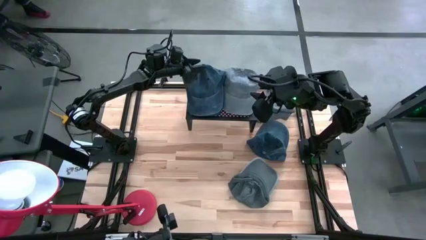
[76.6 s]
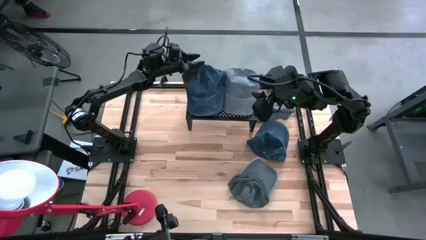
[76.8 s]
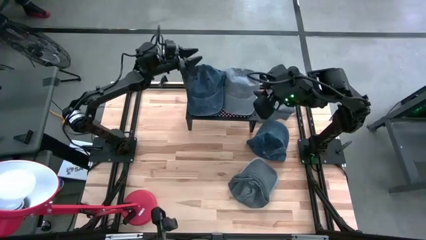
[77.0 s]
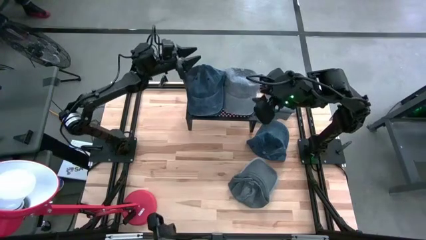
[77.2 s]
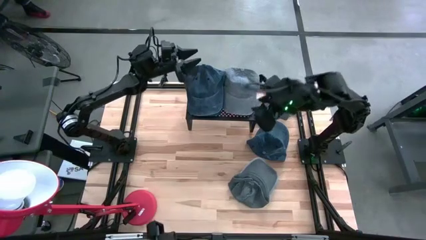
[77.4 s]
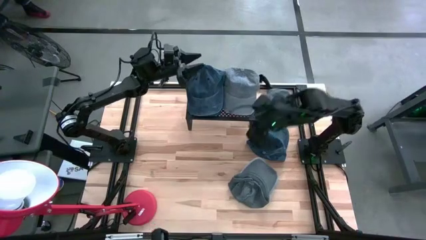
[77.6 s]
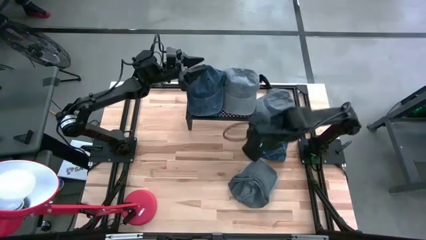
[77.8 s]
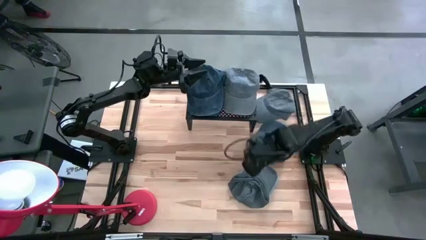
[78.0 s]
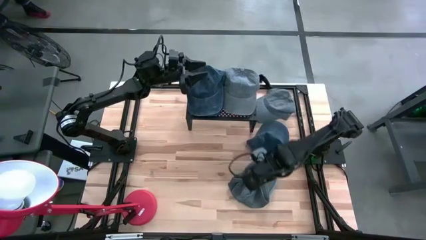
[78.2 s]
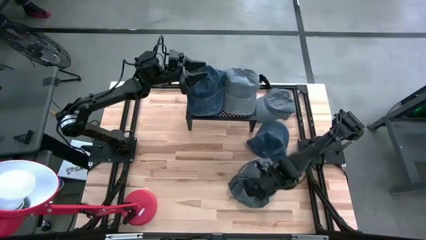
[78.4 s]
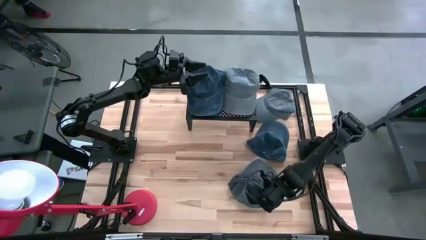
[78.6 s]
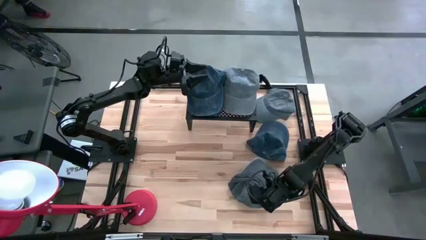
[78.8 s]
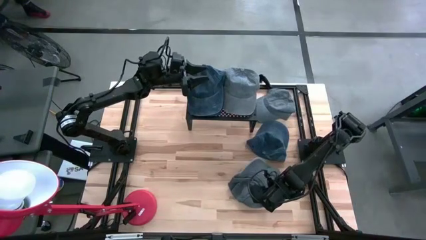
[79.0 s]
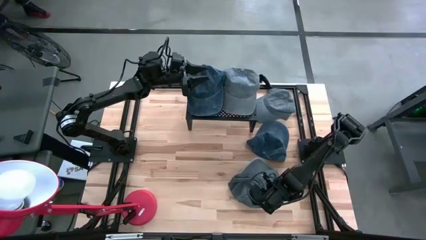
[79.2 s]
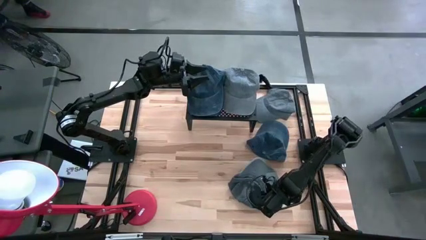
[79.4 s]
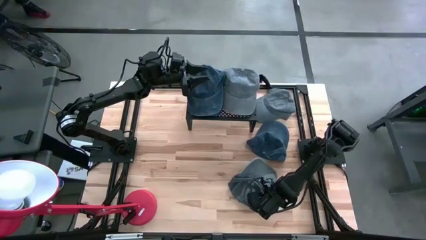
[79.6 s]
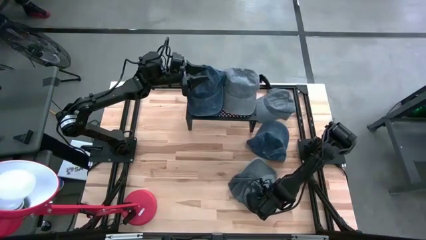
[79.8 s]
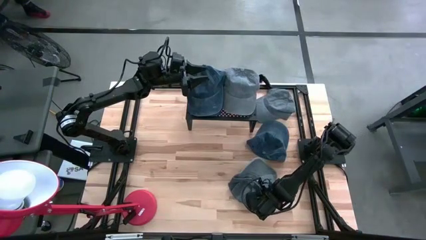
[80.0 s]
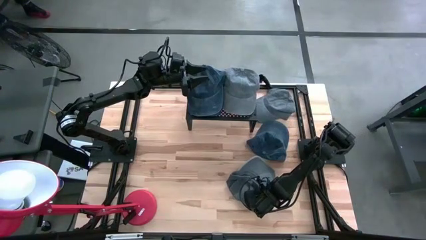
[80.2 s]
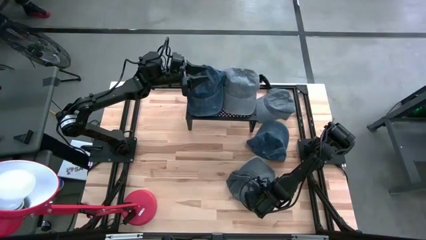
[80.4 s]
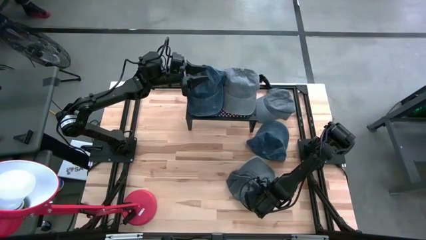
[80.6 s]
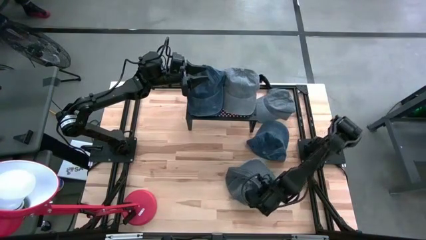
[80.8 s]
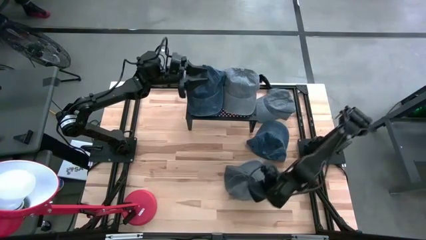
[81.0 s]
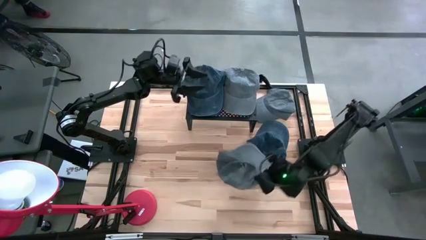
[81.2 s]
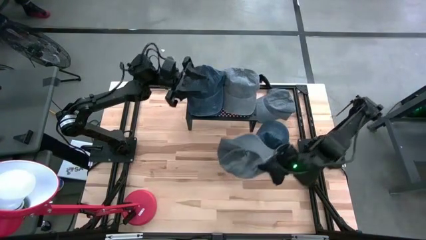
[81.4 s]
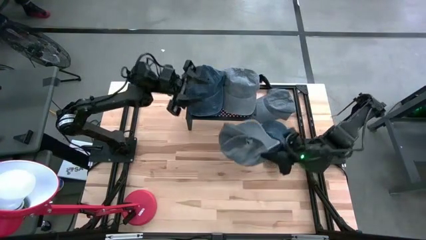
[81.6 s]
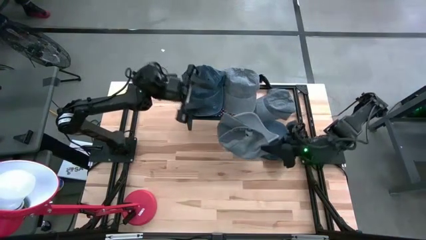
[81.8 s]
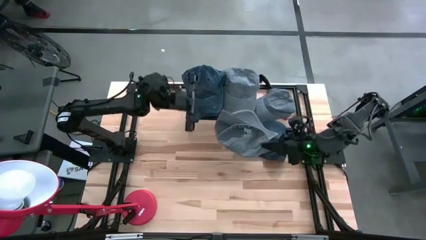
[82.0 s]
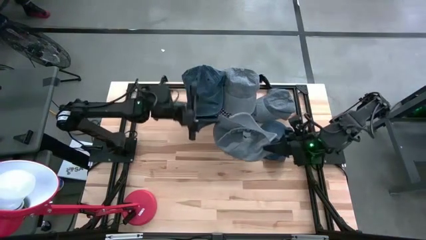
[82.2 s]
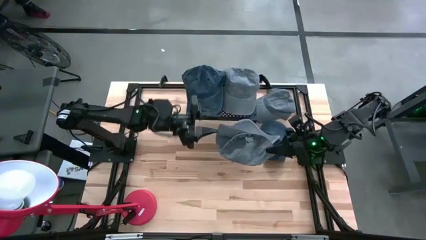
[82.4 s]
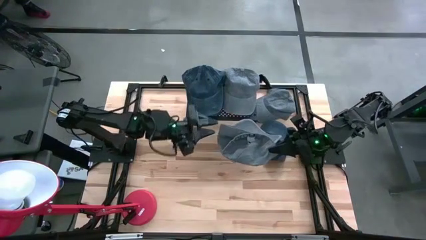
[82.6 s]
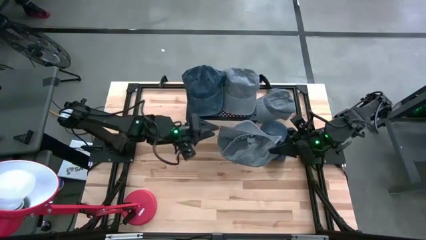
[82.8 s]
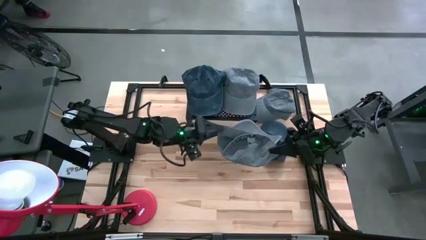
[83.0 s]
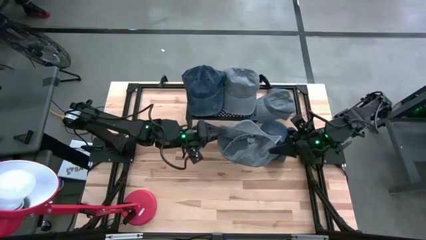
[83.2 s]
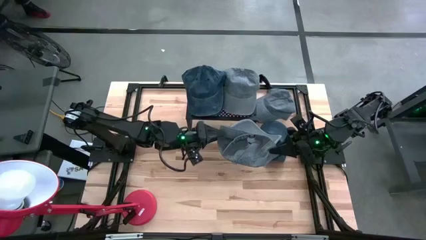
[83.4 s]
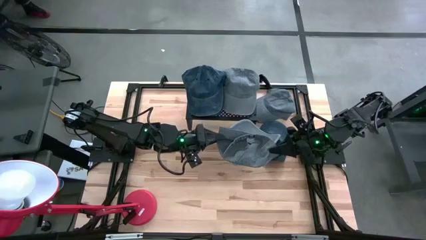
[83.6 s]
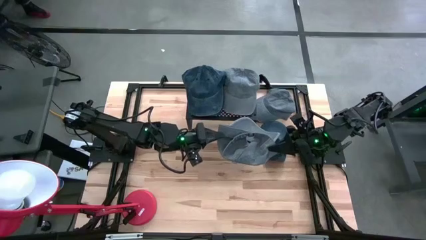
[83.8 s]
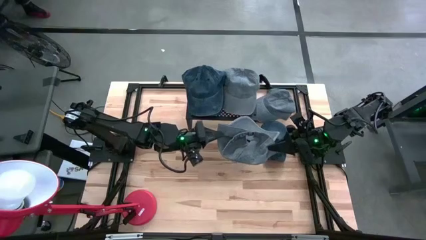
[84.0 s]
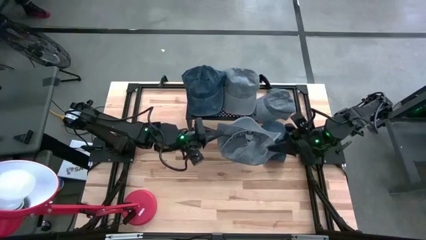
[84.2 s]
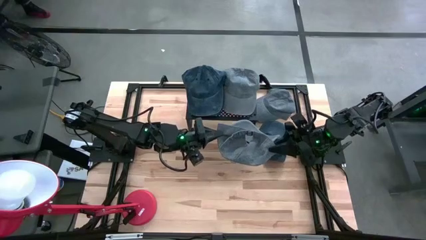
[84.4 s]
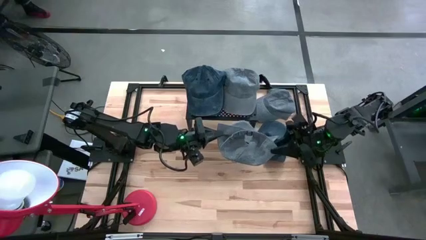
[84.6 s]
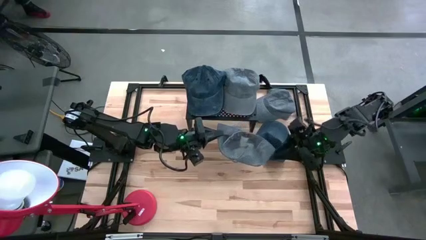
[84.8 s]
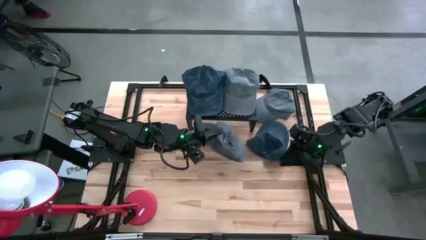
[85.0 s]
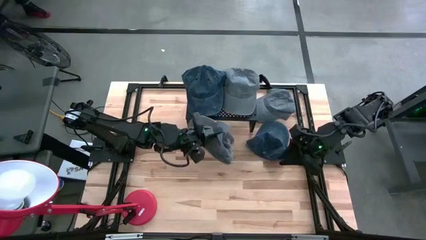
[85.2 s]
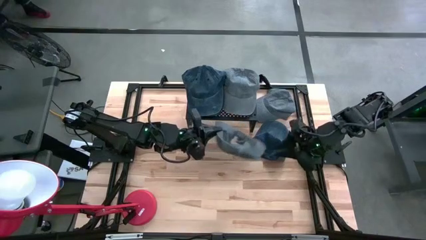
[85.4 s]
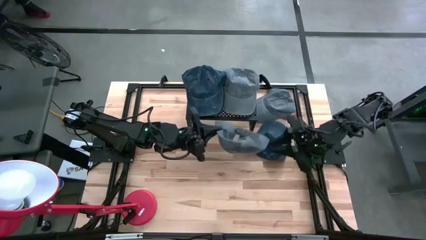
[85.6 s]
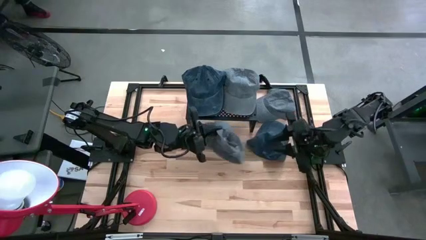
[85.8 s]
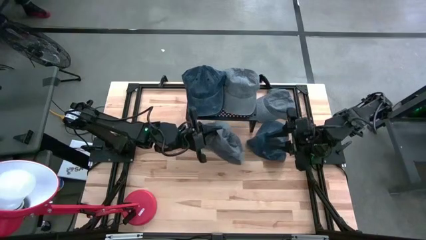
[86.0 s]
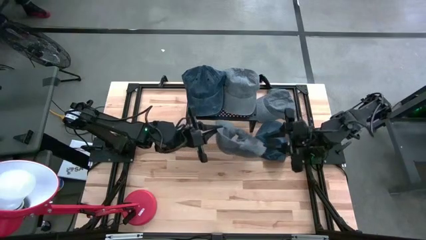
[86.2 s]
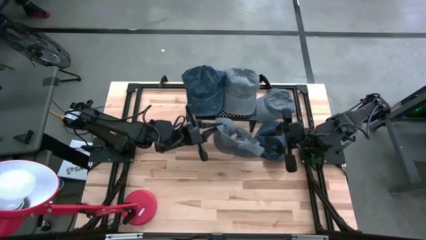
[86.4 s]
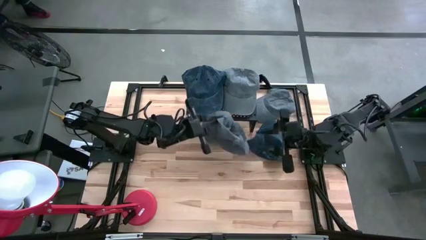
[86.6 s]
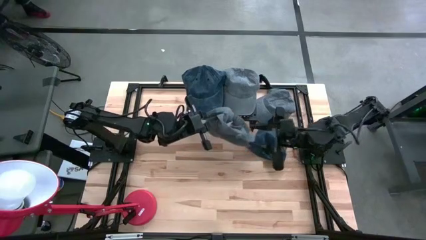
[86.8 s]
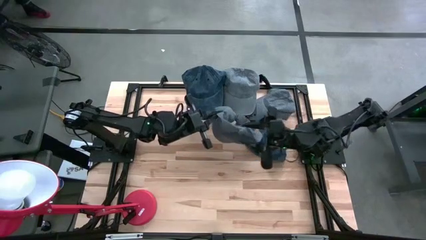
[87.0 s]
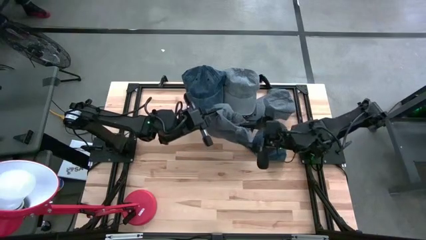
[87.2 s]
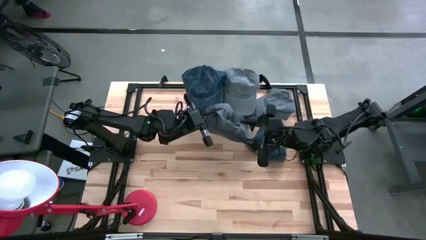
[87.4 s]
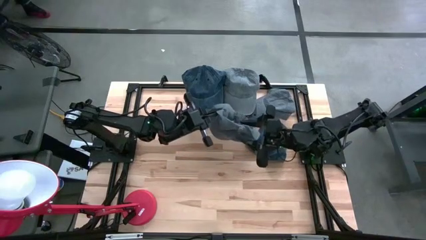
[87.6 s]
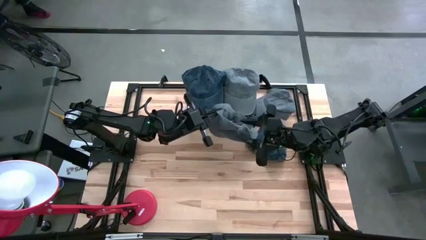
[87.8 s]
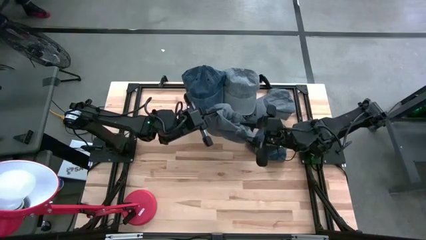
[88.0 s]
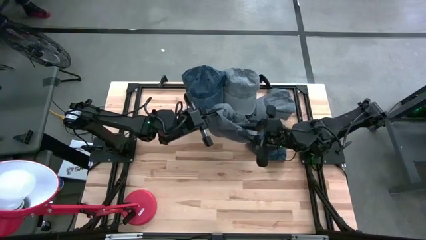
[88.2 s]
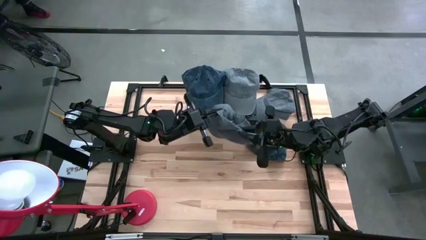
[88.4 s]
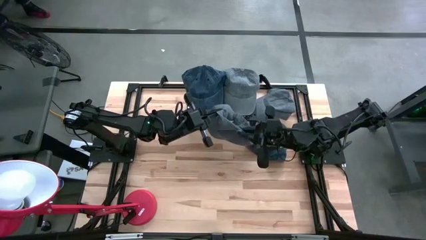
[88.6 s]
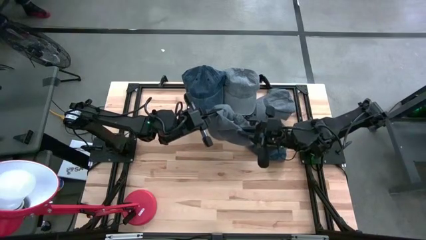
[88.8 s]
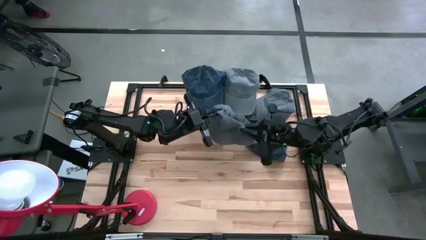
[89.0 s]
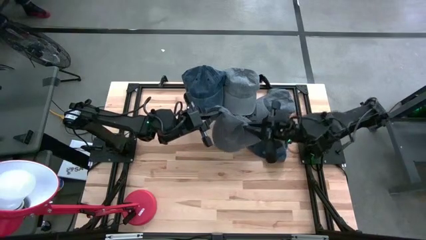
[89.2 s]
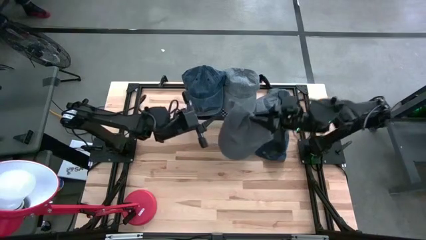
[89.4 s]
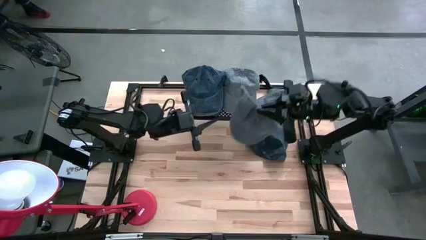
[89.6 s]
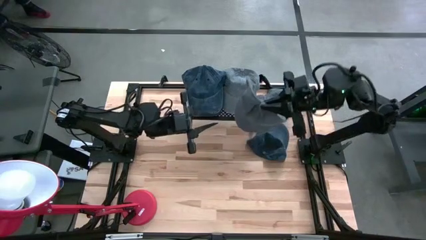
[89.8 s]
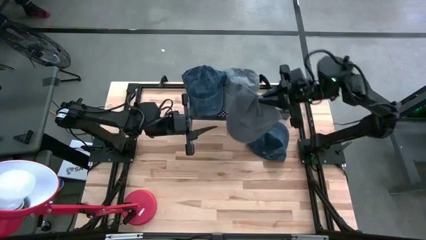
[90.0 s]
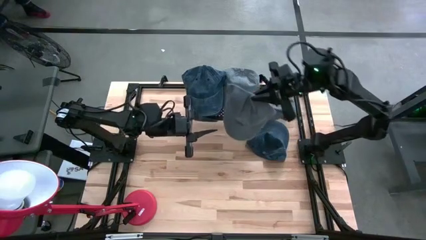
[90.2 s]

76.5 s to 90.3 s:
Task: Pick & Place hat
Stack the bottom gray cap on top of the gray cap on the shelf

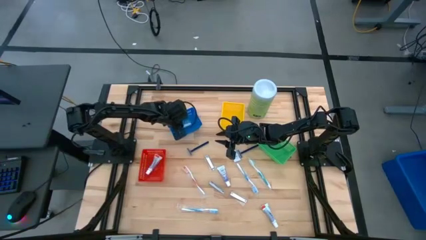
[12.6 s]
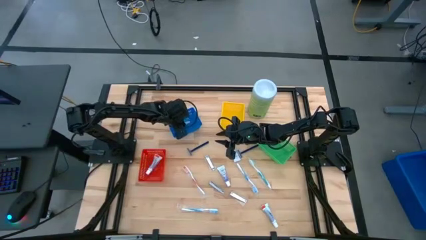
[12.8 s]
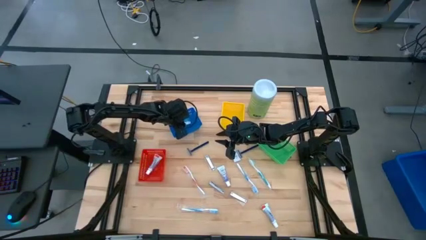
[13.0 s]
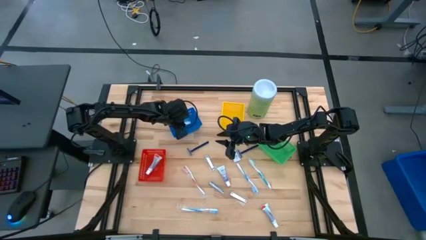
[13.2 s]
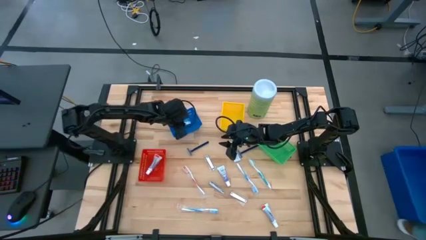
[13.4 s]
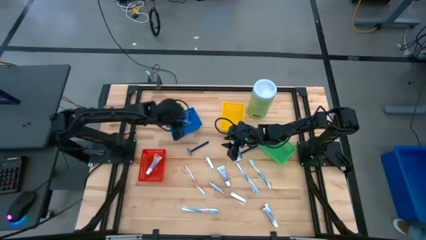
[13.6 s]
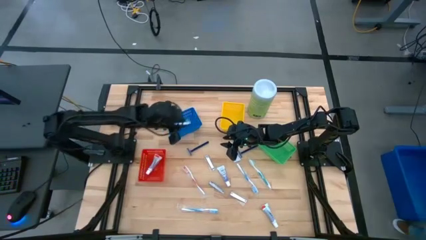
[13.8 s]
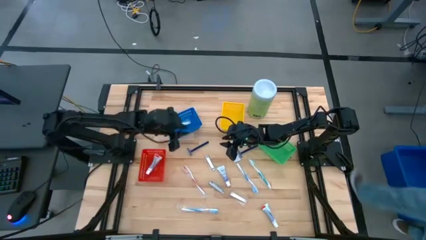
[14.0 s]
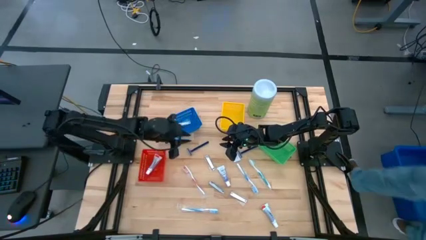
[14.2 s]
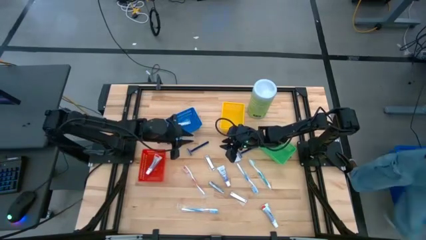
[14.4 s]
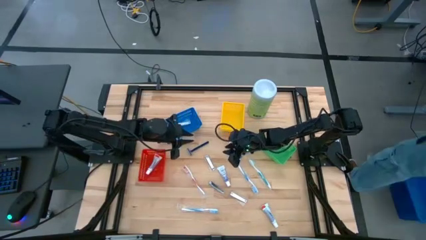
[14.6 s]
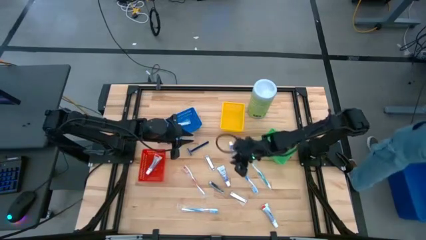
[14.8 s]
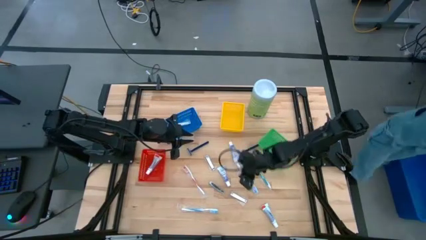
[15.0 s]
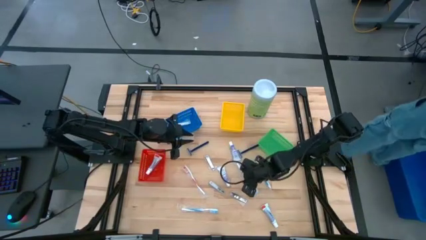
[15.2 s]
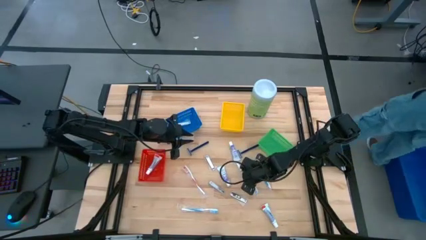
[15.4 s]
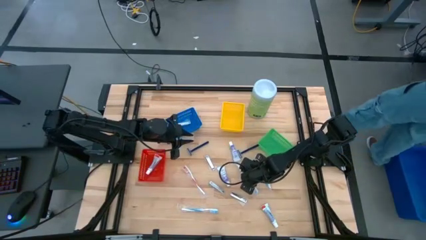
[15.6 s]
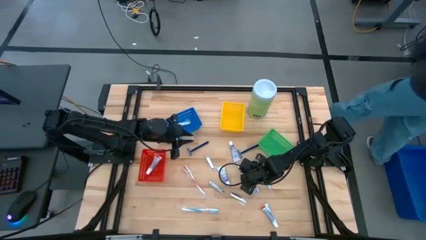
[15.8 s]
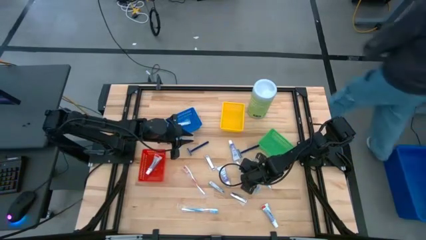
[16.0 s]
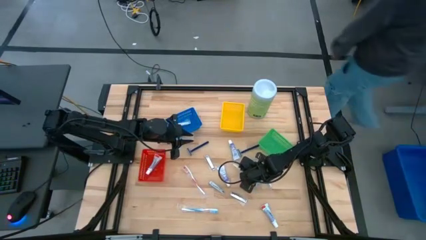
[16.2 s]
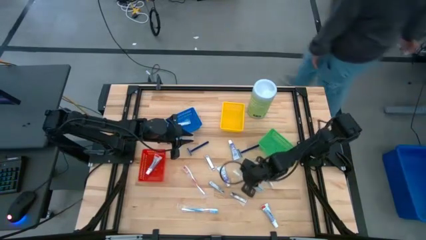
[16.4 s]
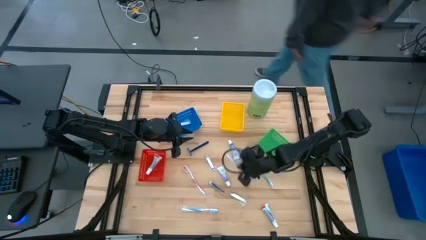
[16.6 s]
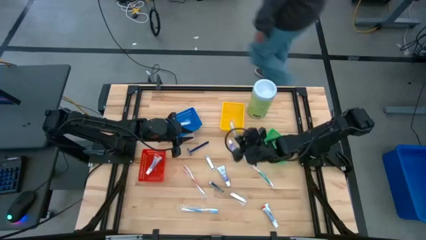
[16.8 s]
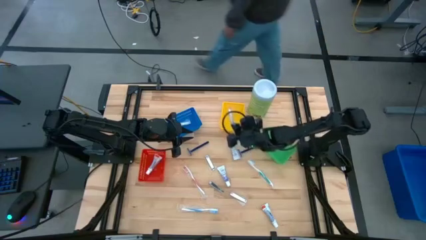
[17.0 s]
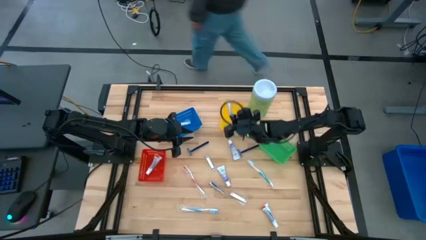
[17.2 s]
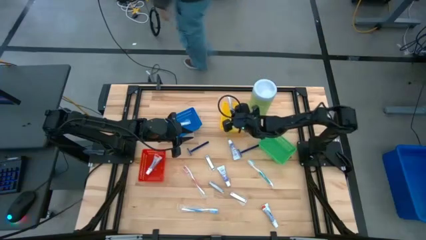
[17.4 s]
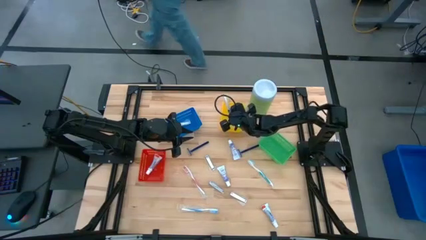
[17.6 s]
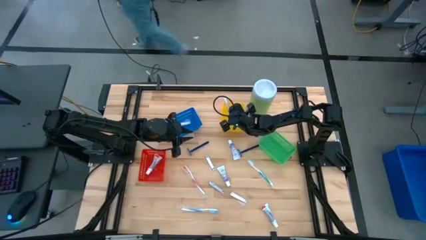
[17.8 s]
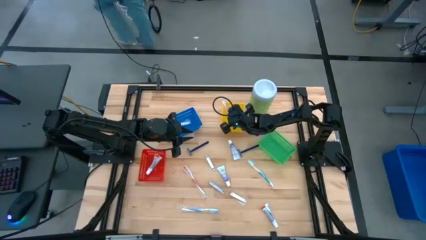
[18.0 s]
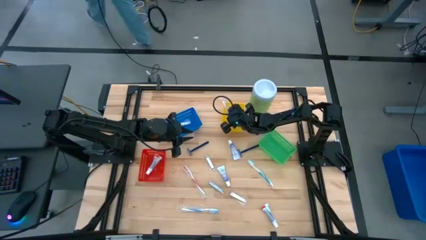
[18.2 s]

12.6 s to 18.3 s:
Task: Pick & Place Travel size toiletries
Put the blue toothbrush into the yellow basket
